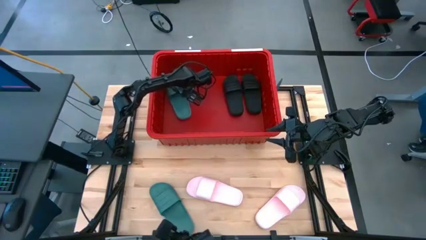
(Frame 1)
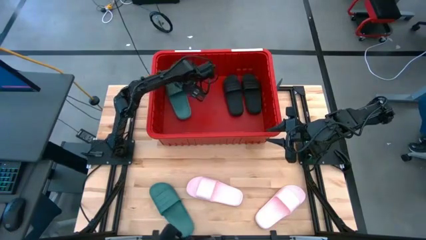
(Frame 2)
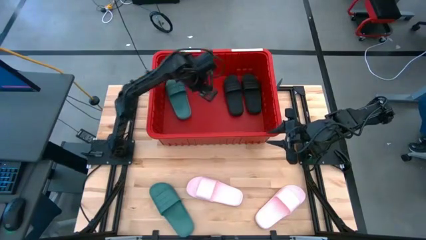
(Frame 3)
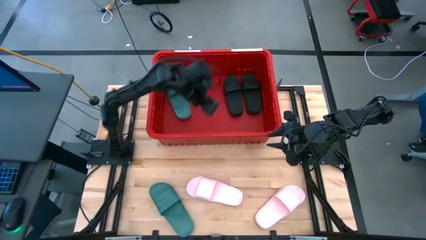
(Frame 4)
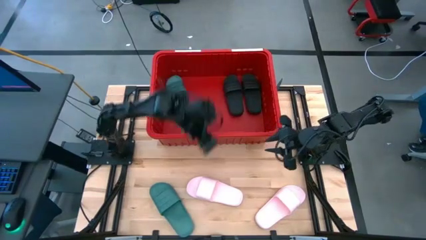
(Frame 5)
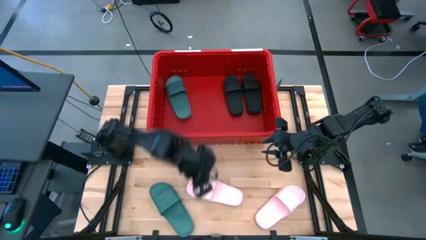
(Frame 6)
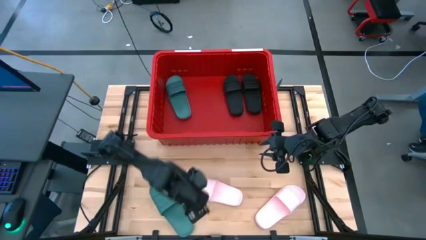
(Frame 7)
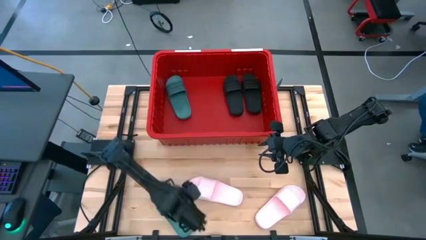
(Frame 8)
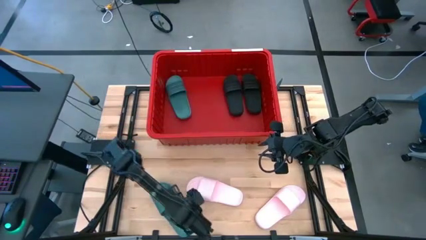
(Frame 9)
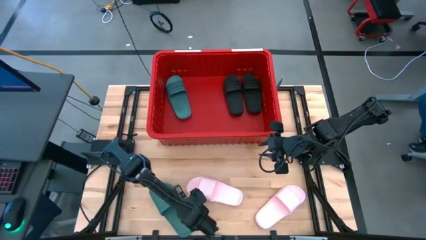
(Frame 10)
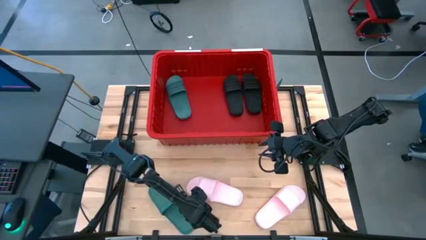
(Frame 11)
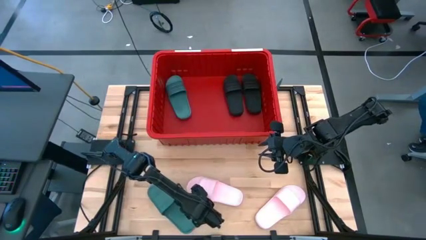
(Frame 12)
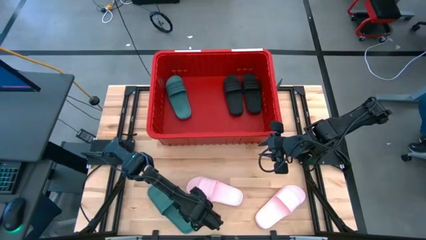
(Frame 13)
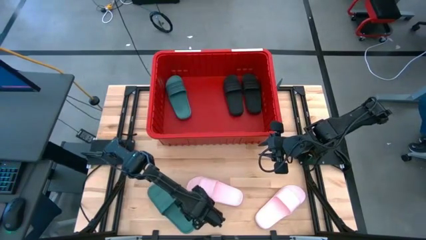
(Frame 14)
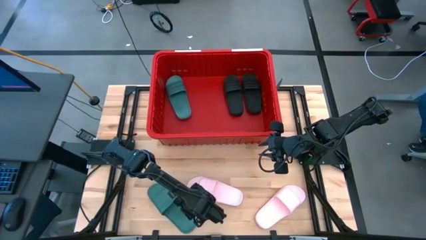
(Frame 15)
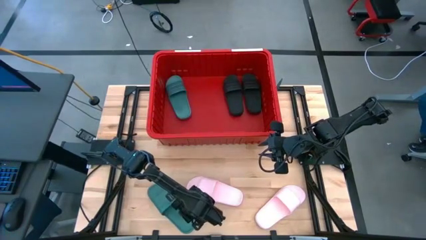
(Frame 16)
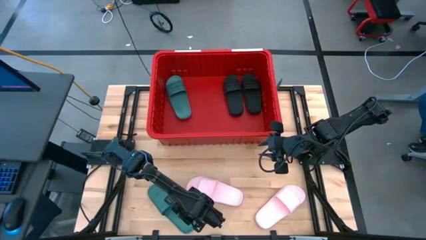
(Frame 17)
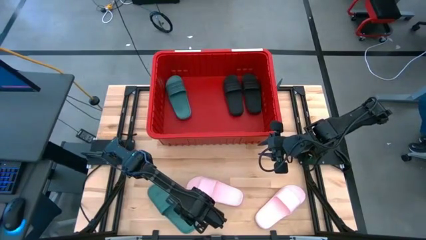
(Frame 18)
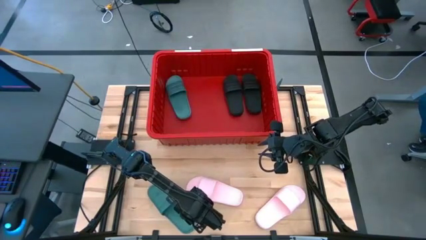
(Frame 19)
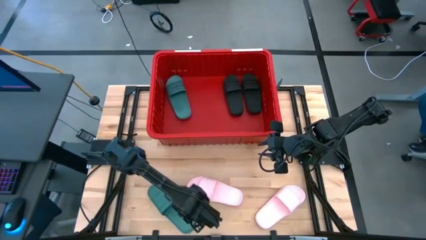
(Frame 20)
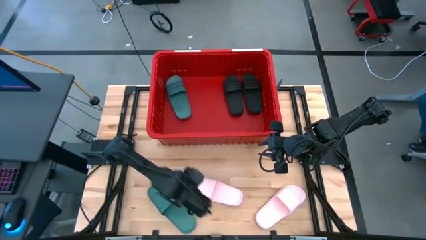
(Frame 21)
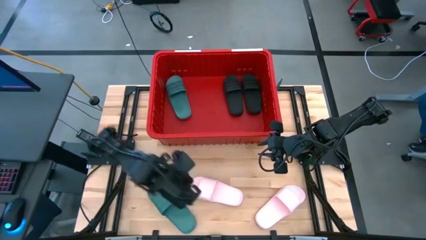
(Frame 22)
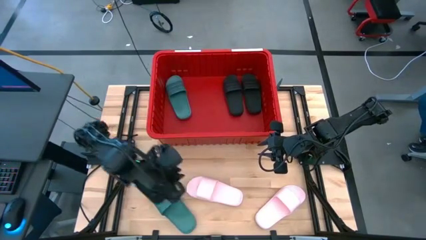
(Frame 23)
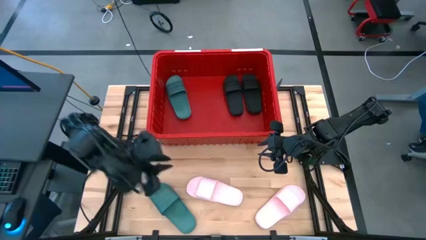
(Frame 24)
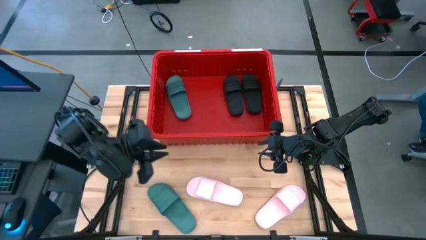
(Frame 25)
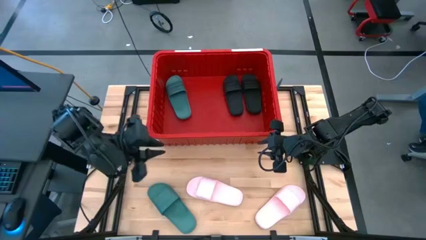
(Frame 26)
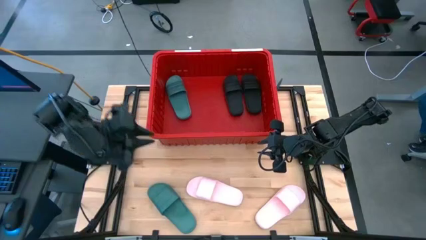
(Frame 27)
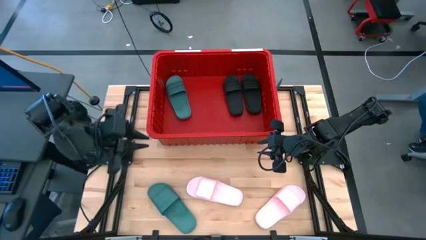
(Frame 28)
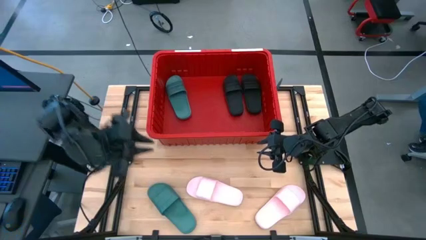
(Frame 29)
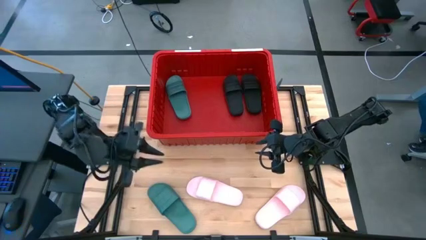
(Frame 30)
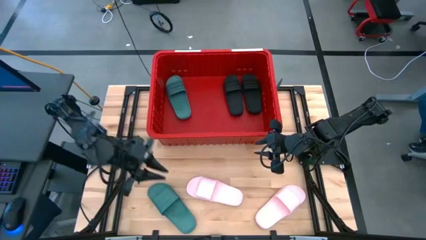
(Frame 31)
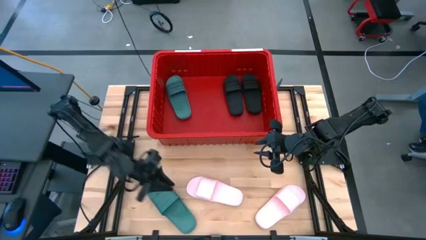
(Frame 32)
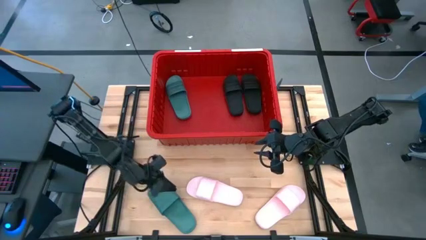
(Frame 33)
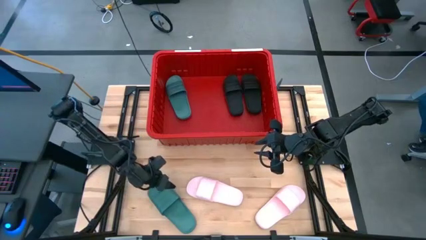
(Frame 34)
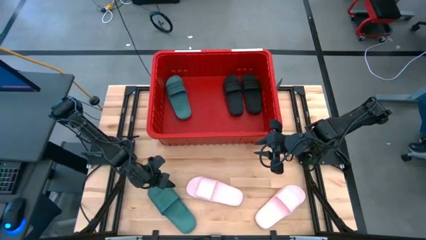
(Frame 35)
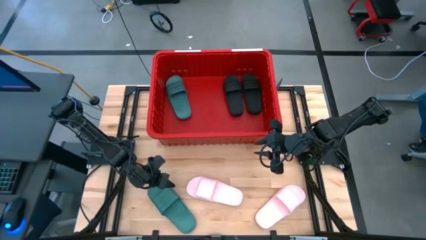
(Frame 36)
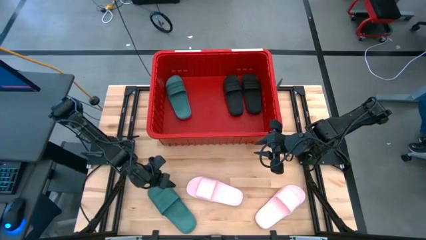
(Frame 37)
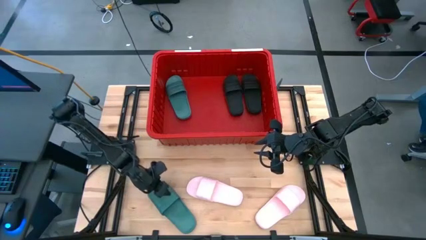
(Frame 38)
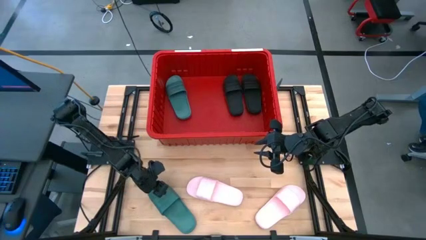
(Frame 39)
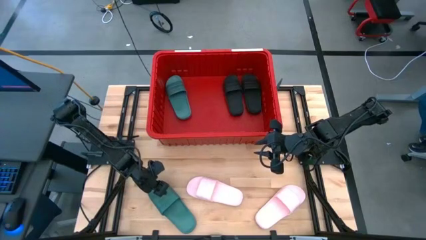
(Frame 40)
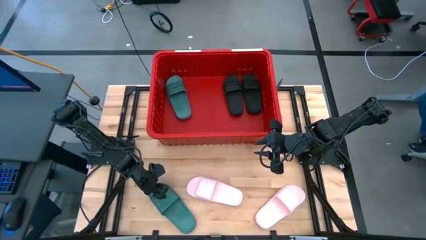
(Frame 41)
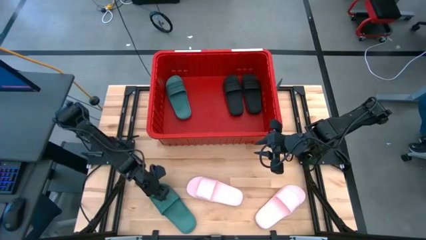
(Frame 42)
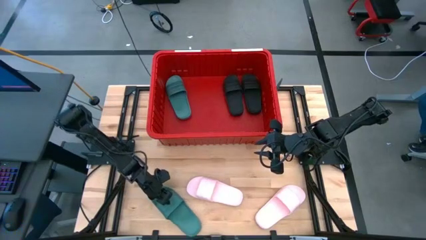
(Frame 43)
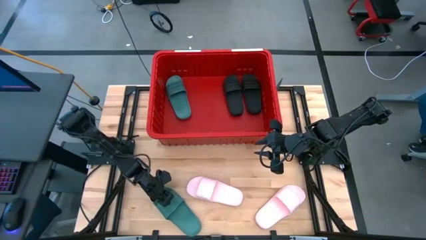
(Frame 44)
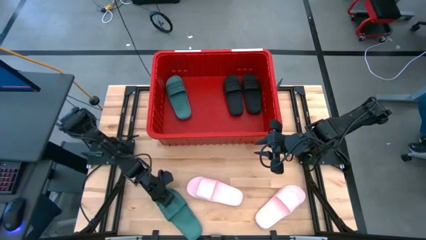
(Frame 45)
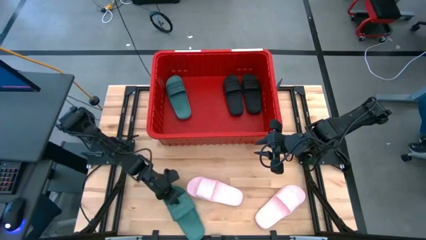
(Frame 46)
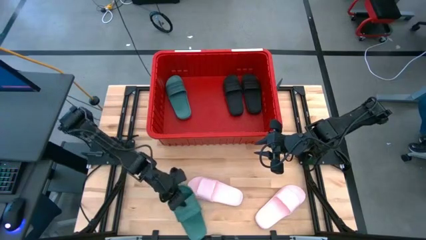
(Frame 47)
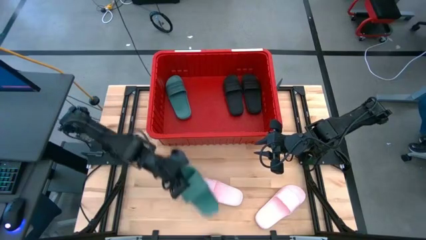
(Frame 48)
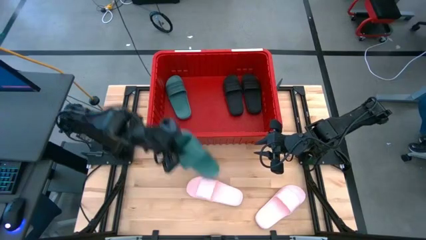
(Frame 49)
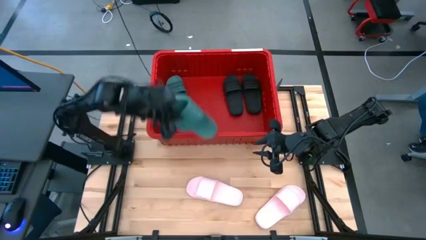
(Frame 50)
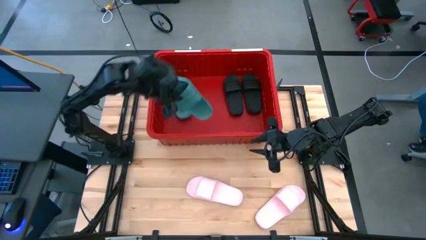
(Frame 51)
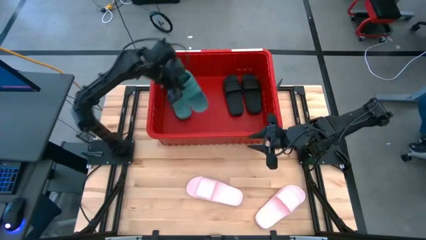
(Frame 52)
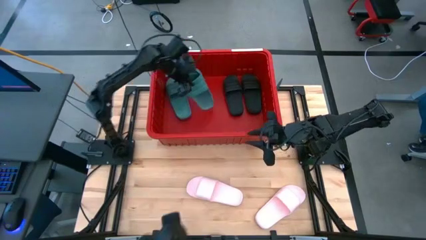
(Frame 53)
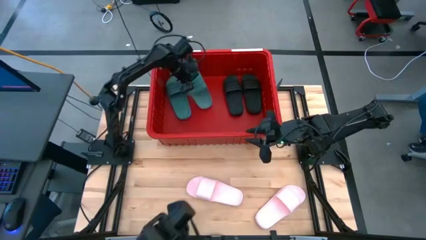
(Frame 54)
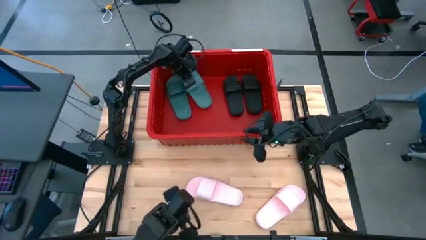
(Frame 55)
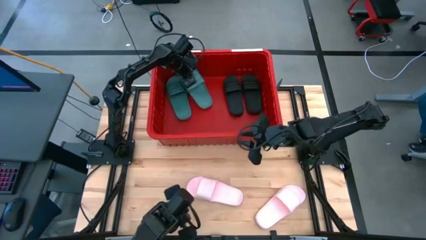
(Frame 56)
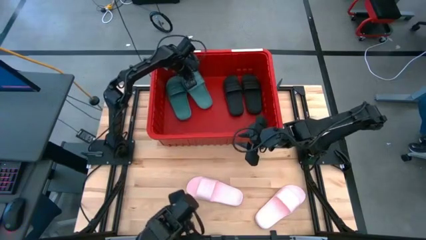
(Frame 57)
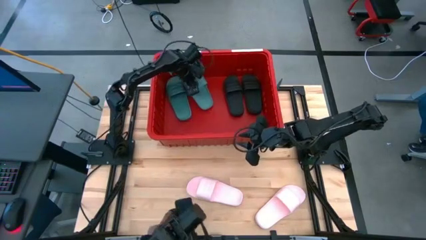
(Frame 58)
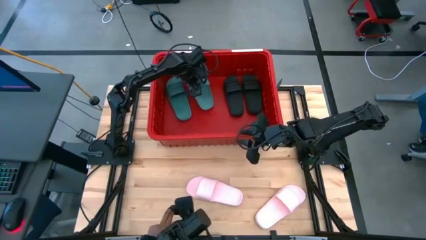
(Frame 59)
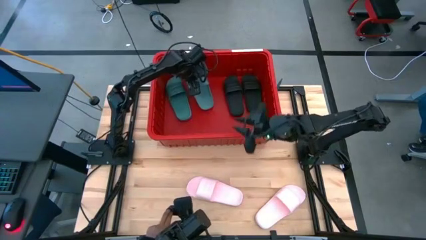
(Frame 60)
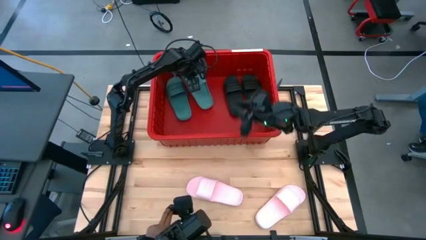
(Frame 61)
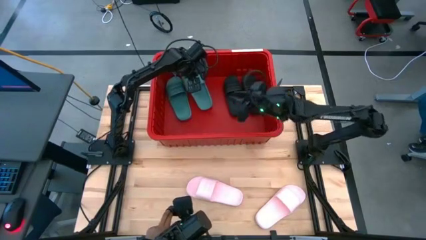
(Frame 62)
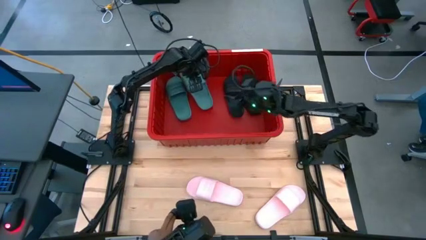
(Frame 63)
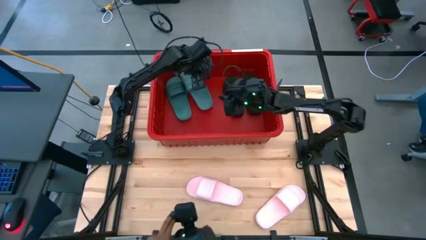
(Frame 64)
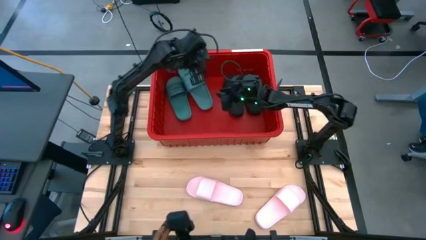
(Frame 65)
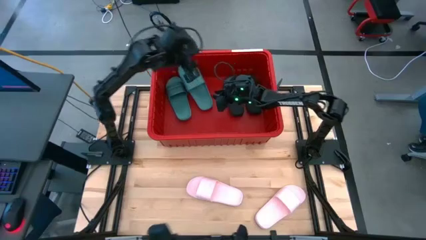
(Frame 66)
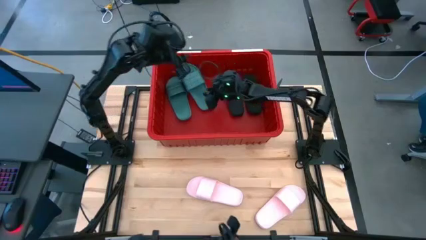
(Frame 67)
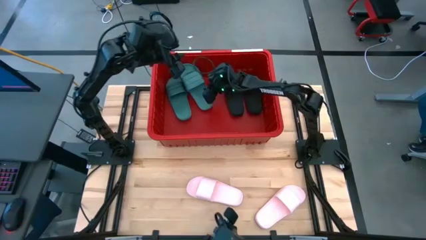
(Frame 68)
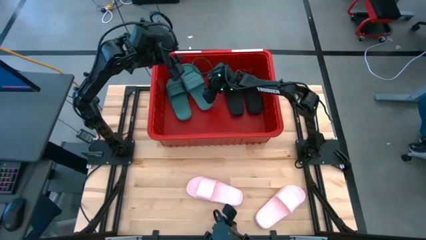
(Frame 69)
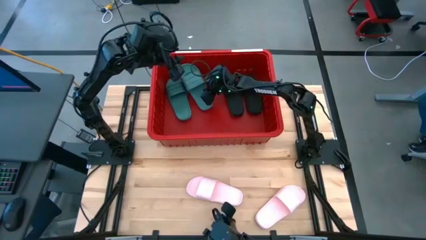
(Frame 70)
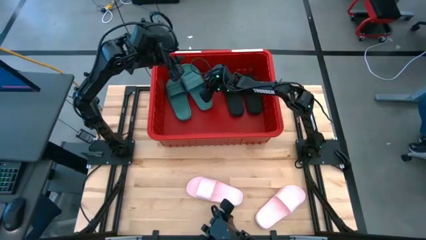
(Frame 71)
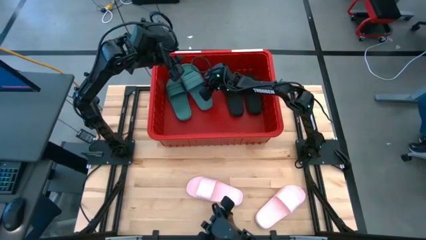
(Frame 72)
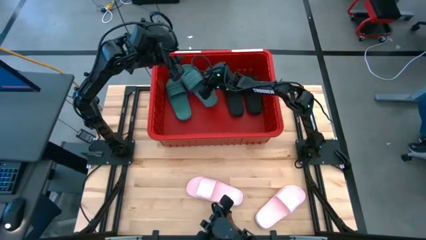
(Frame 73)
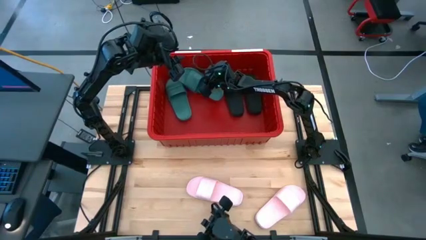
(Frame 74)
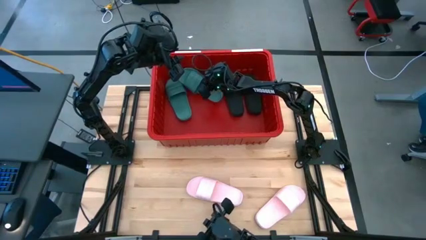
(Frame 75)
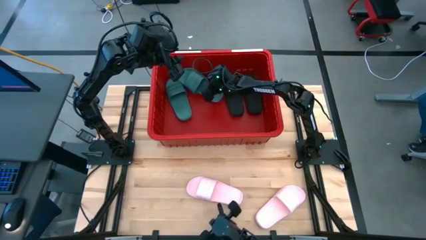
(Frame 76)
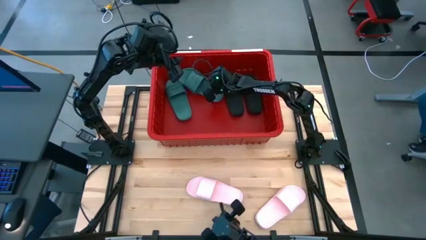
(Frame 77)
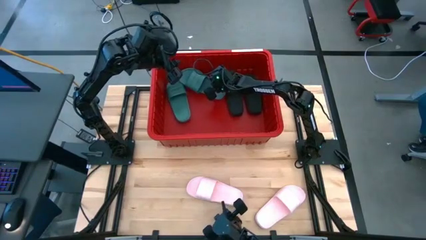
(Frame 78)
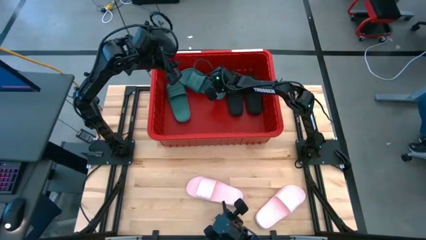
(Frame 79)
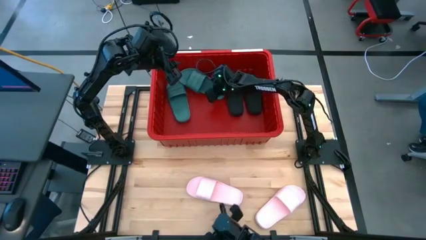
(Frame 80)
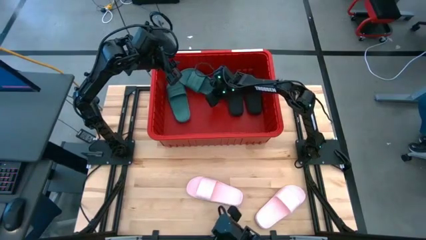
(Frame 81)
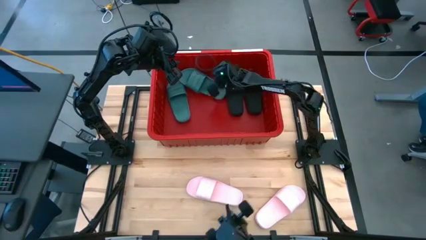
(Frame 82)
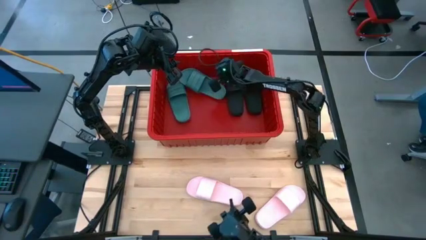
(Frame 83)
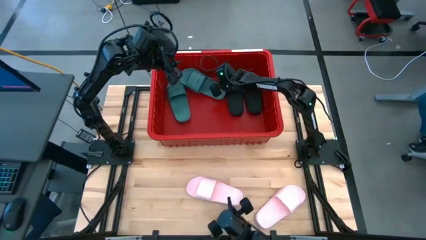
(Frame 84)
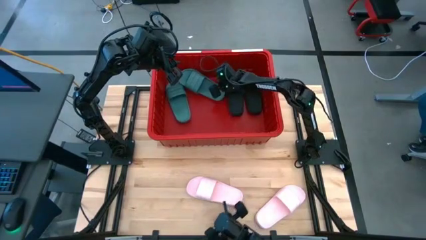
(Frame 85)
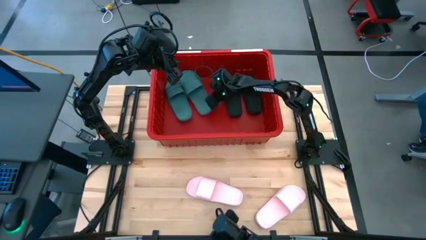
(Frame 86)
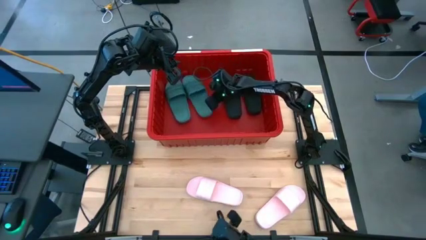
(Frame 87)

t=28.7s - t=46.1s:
Task: Pick and place slides into bin
Put the green slide into the container
